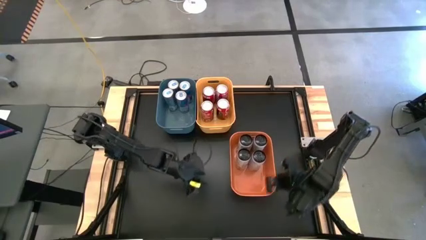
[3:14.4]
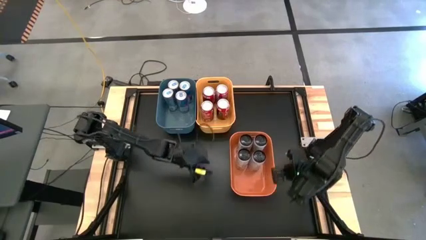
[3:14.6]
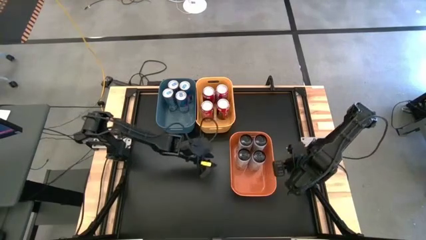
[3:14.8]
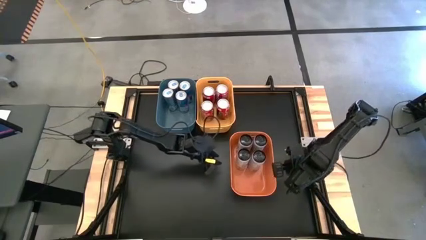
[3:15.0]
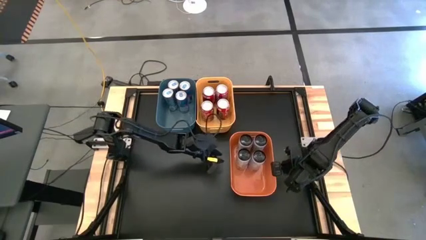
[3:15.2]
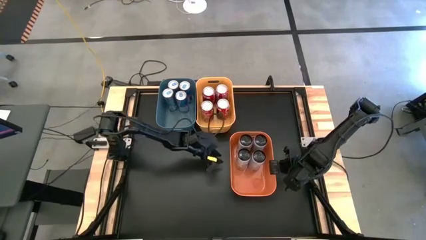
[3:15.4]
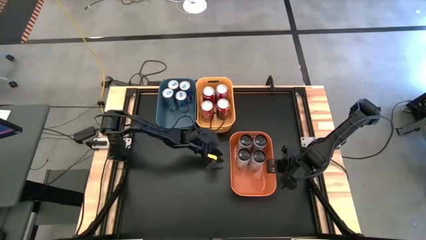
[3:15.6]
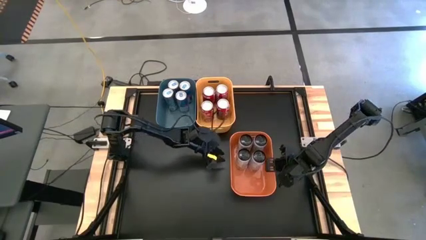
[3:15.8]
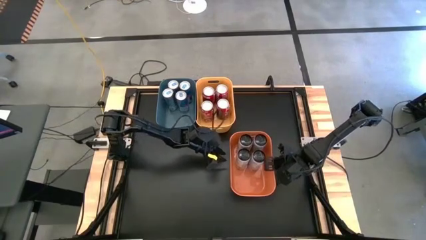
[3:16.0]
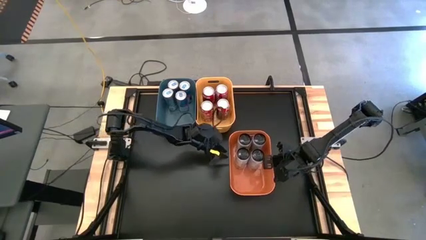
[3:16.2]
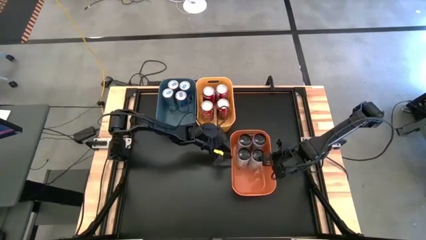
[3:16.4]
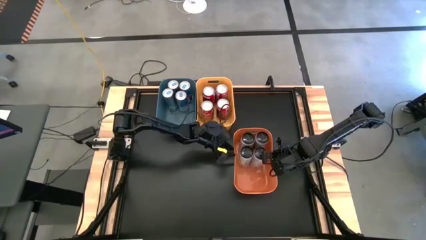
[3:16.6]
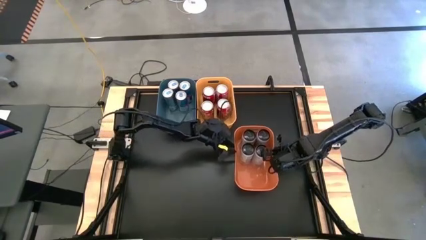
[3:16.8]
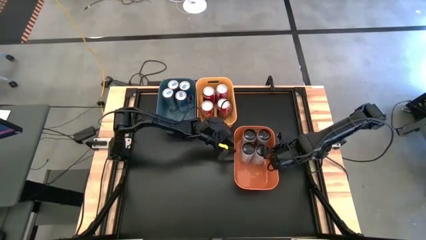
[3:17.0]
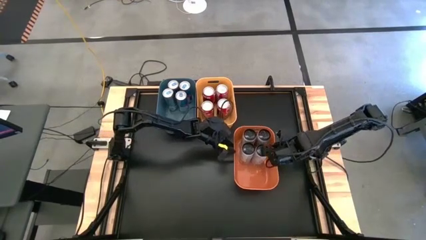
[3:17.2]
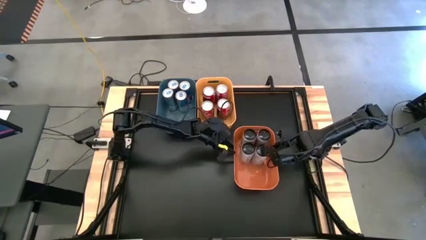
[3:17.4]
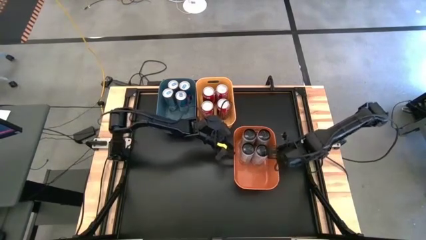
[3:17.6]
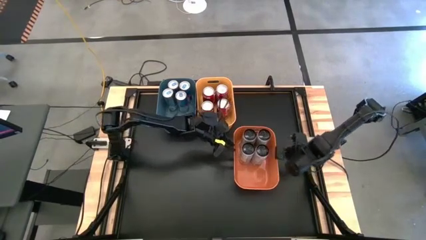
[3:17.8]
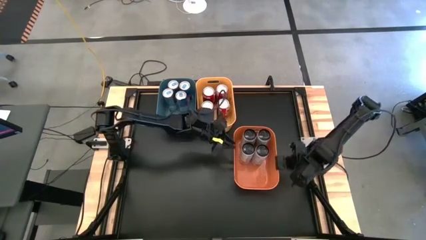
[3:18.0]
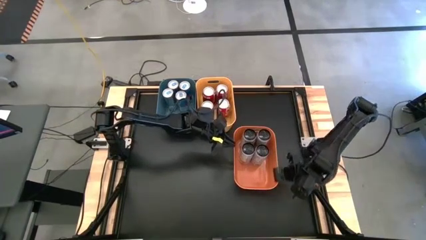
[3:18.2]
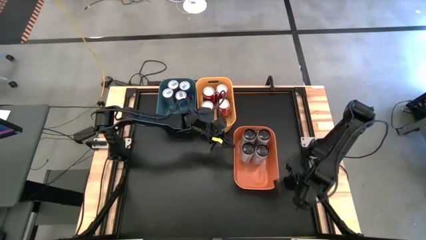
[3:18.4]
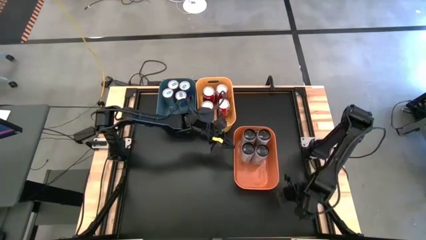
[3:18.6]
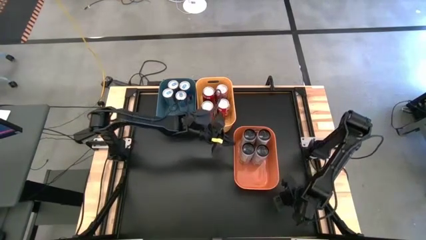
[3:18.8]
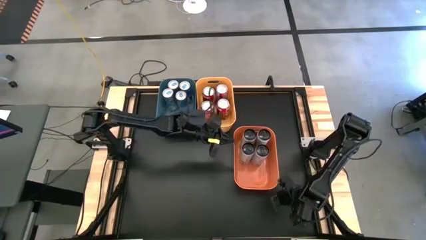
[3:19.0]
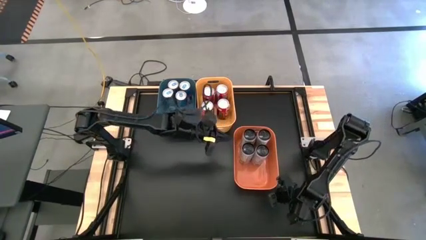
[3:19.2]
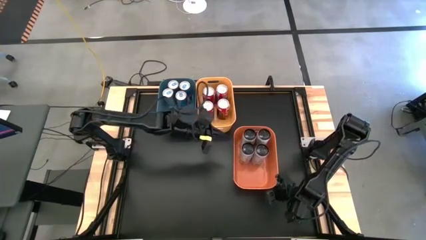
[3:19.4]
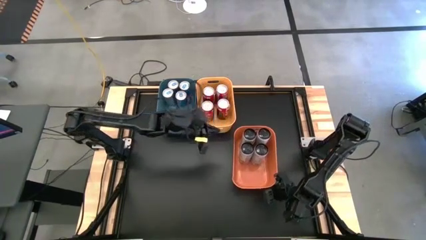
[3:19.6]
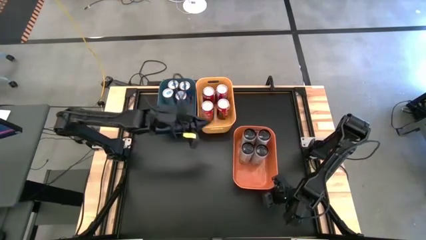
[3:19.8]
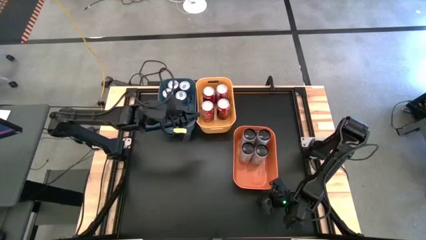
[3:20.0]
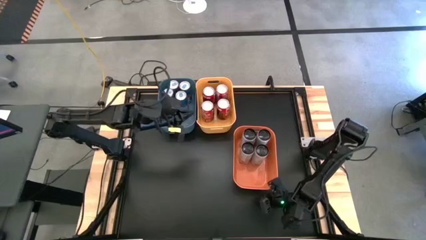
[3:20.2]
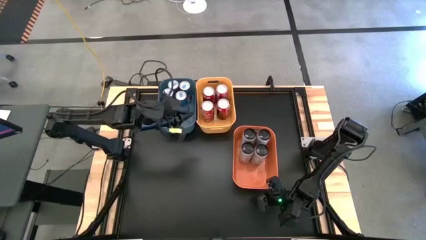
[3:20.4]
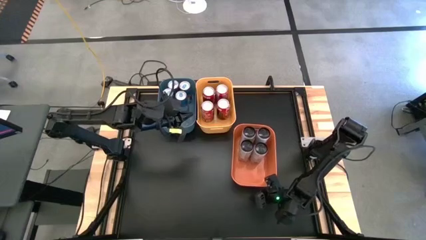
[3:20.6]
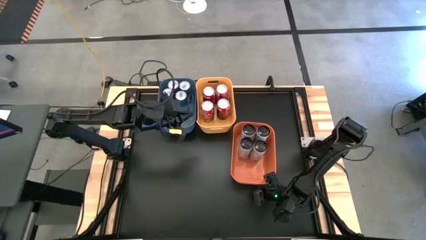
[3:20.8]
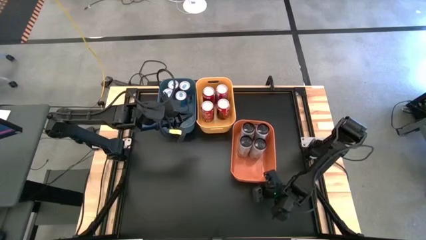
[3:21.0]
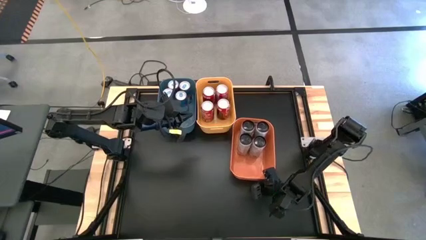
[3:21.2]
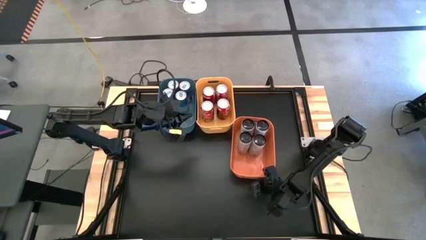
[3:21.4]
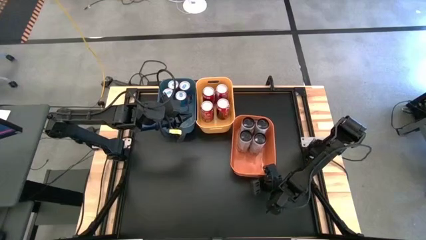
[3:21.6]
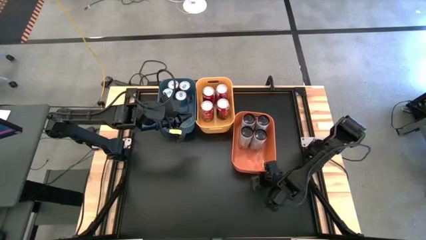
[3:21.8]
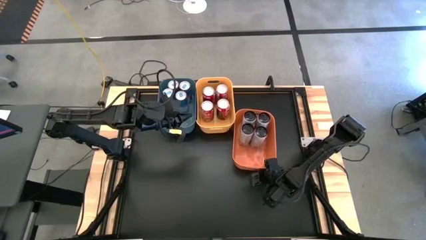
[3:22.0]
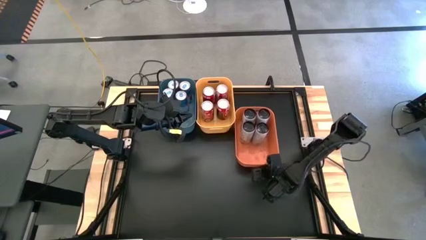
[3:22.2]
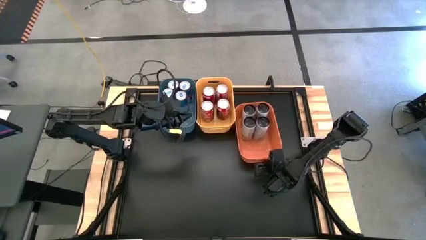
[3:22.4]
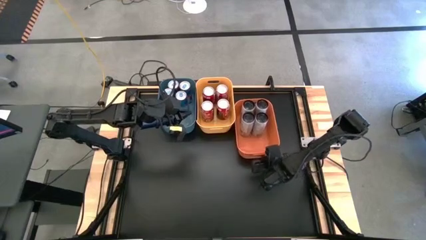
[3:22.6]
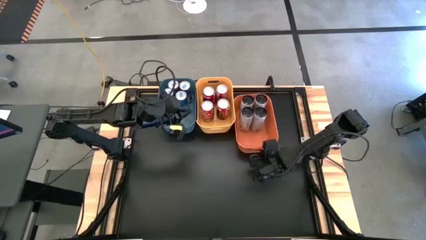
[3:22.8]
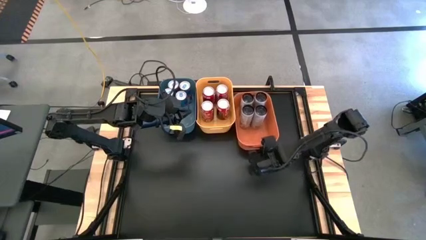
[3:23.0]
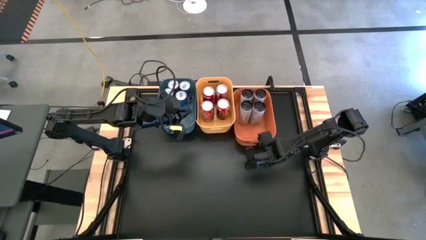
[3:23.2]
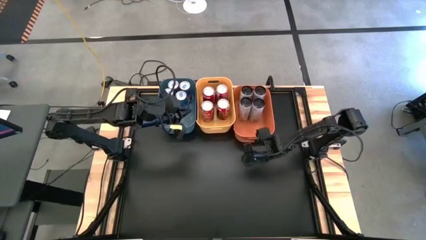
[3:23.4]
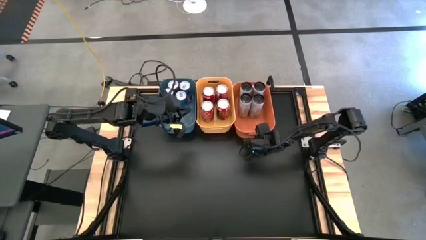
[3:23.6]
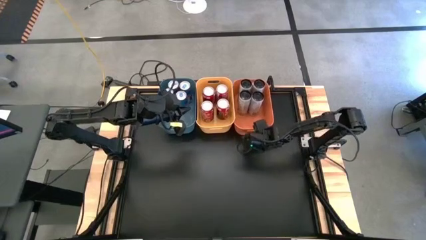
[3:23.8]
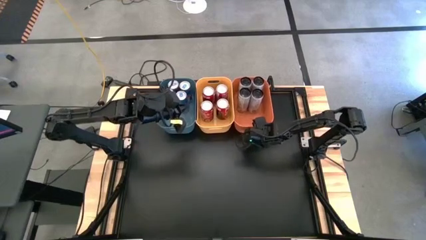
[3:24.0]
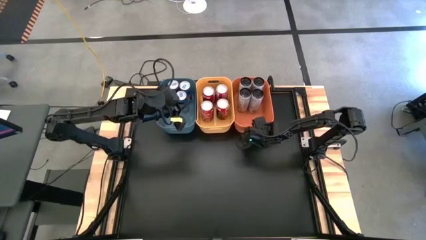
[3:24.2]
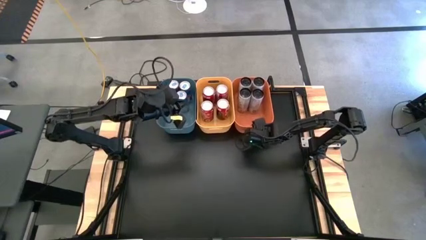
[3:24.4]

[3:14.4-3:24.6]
Task: Sort soda cans
Move the orange bin to the top right of the table

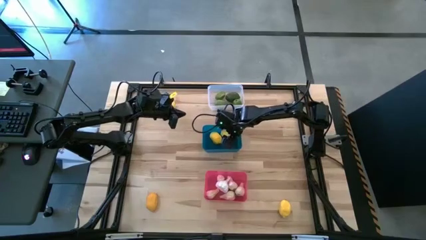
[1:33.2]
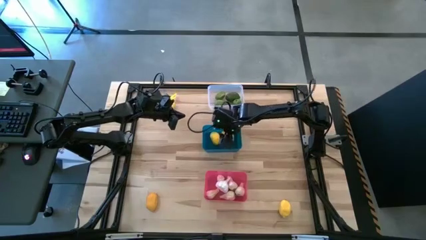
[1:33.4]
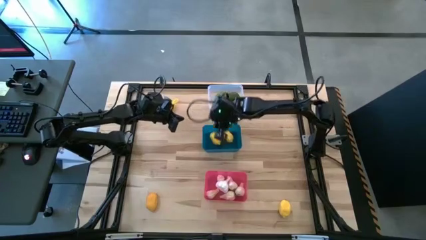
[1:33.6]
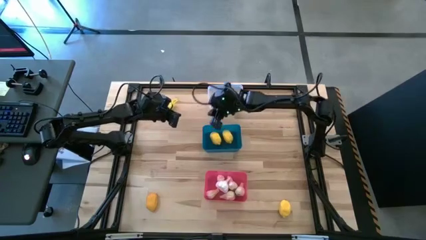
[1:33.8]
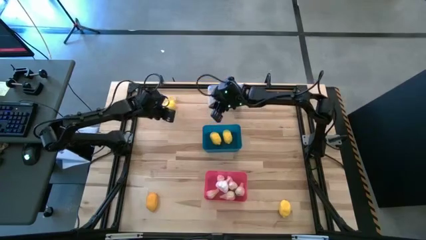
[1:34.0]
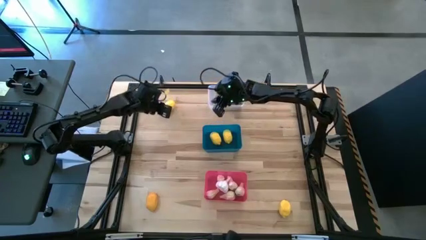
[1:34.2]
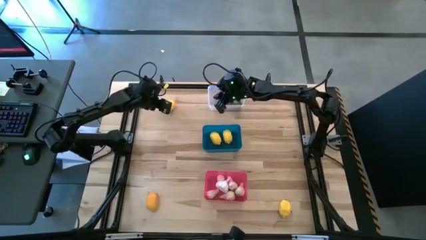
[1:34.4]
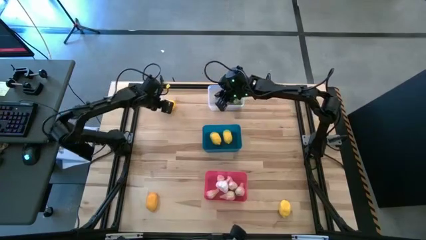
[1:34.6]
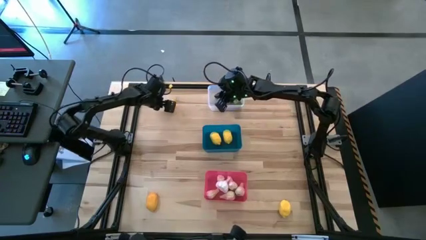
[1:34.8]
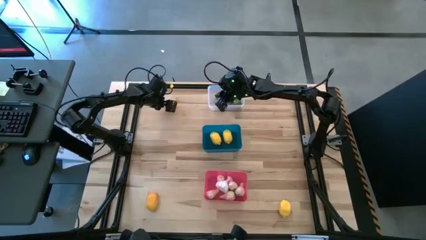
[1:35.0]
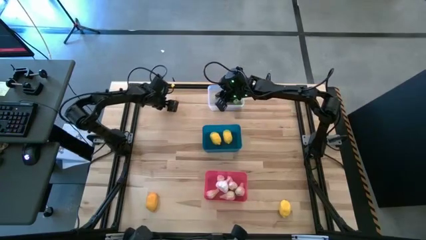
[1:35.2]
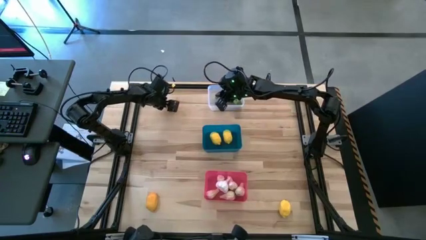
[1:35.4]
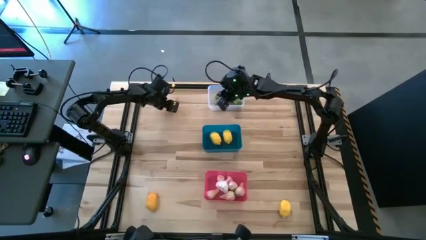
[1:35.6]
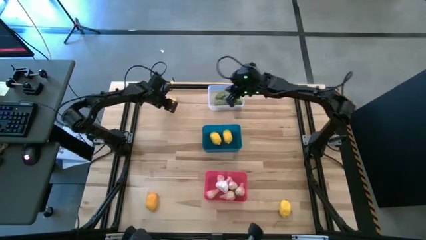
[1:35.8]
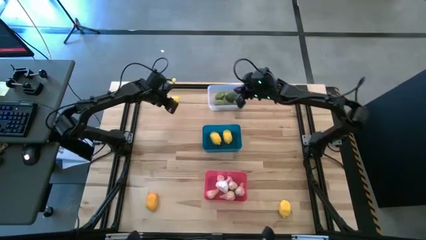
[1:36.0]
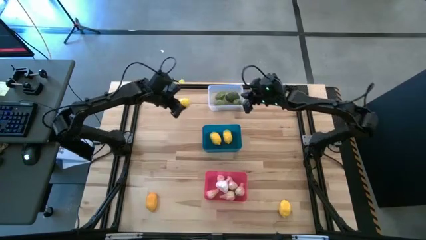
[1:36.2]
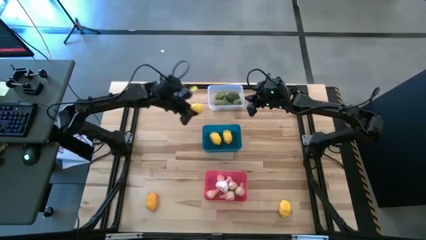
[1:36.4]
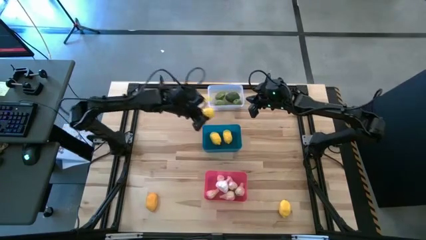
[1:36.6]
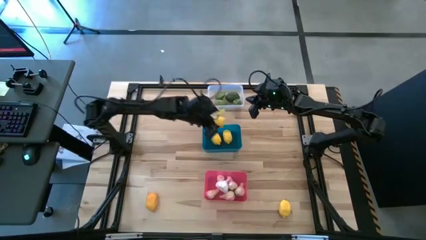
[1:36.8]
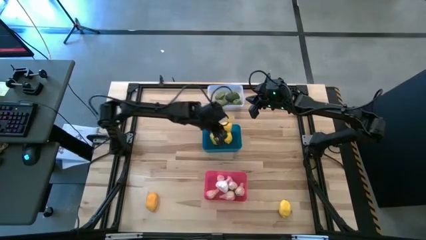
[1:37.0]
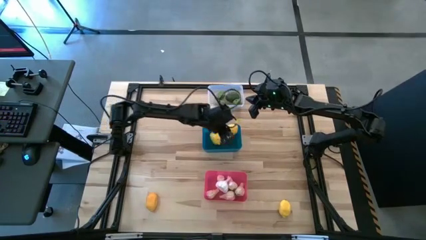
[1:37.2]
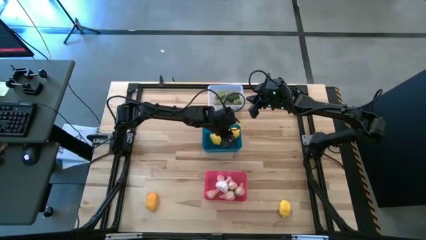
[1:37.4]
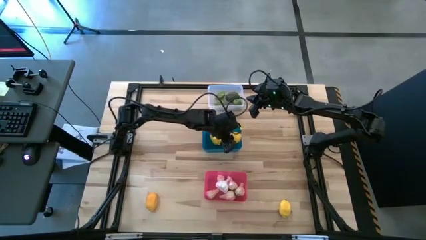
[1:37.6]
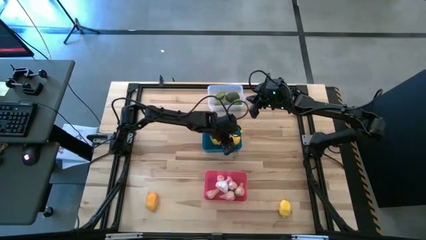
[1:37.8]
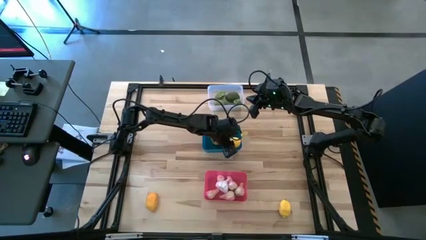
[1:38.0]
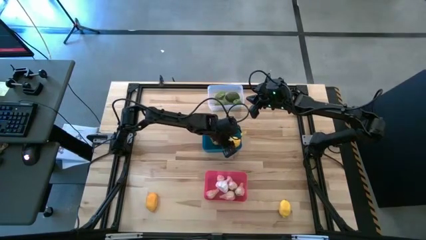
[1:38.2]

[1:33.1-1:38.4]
Task: Sort produce into baskets
Put the top yellow lemon into the blue bin

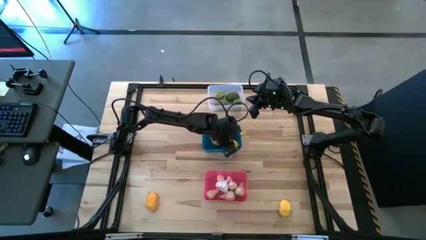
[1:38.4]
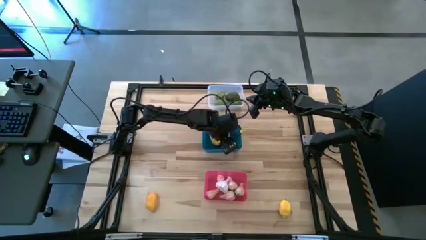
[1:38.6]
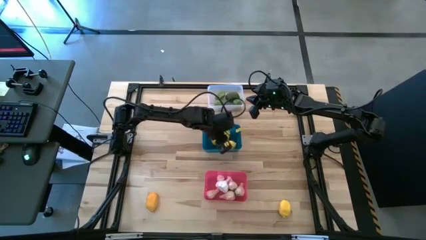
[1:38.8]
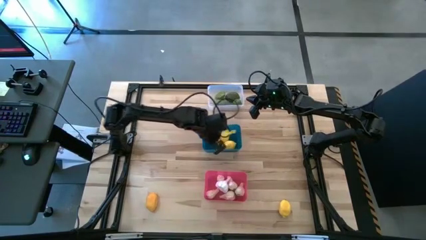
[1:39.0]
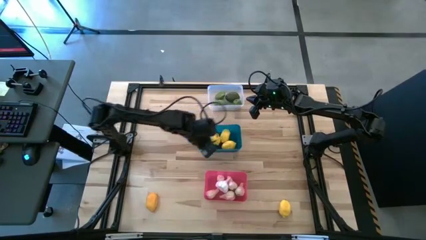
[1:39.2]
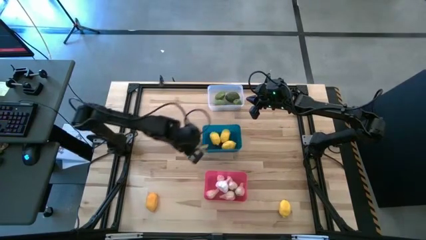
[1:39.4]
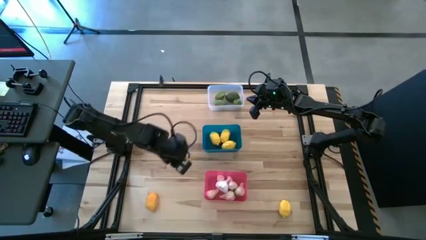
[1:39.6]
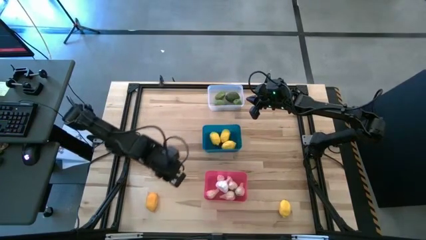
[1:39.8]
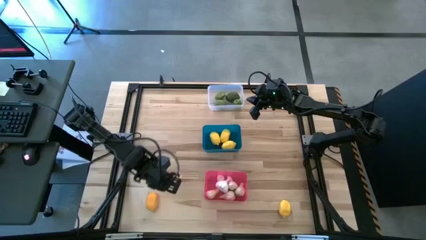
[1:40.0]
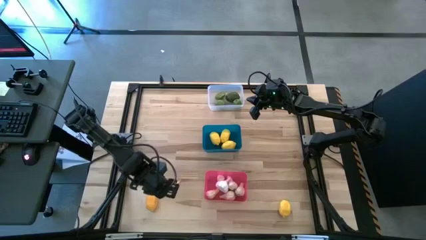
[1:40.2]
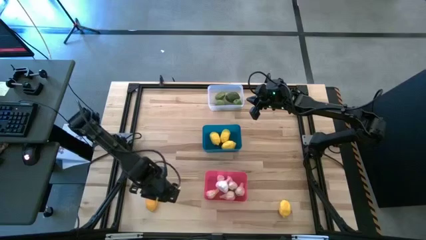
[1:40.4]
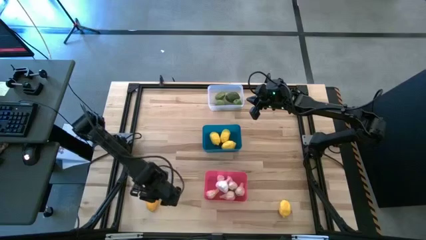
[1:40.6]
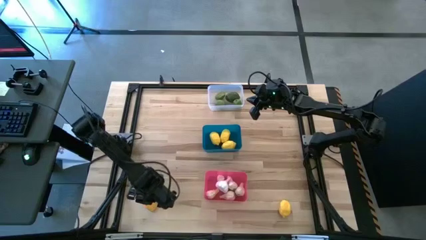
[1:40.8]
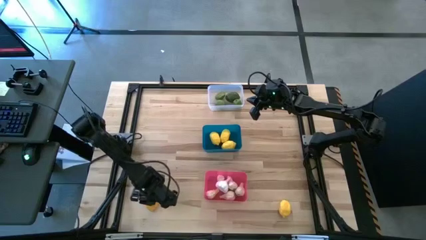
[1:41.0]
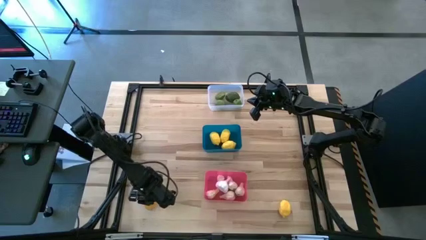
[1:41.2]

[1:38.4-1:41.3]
Put the left yellow lemon into the blue bin
